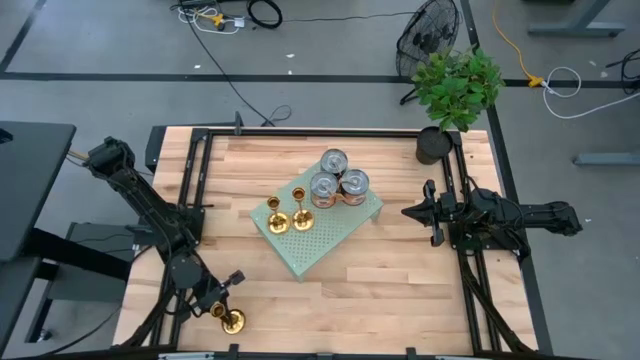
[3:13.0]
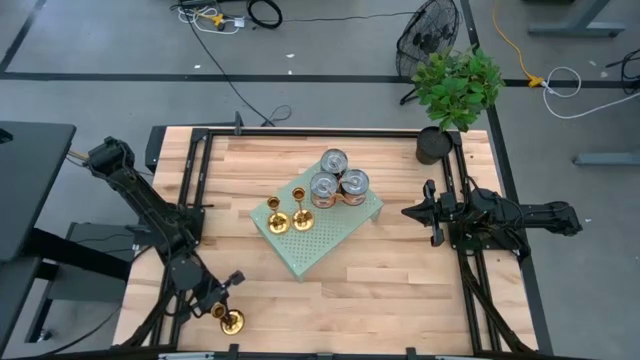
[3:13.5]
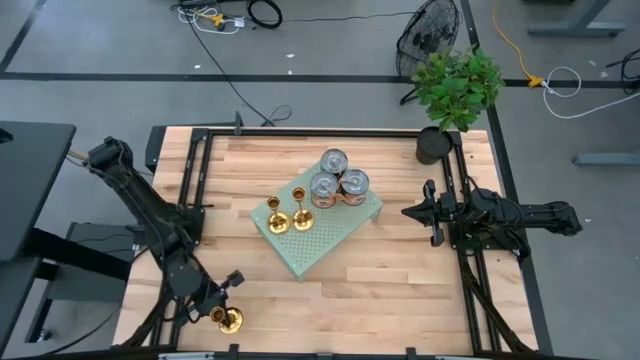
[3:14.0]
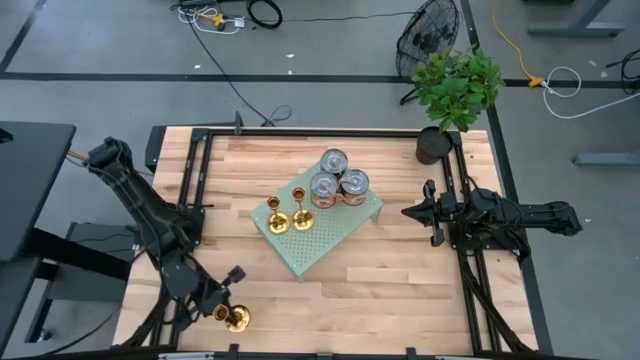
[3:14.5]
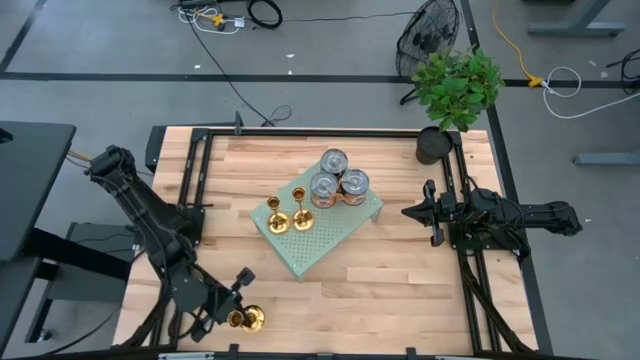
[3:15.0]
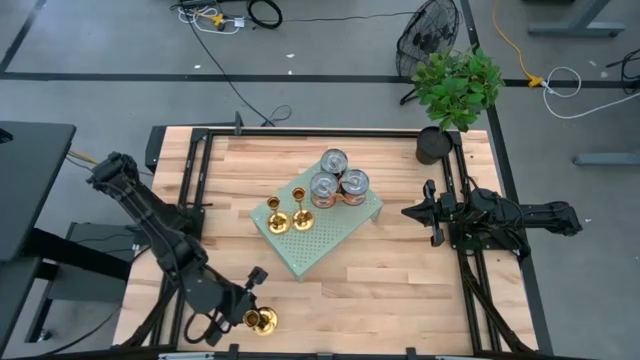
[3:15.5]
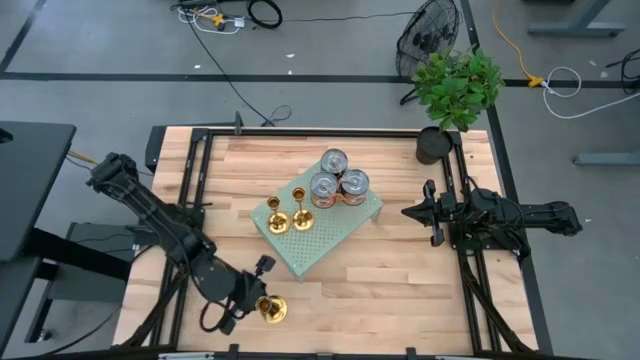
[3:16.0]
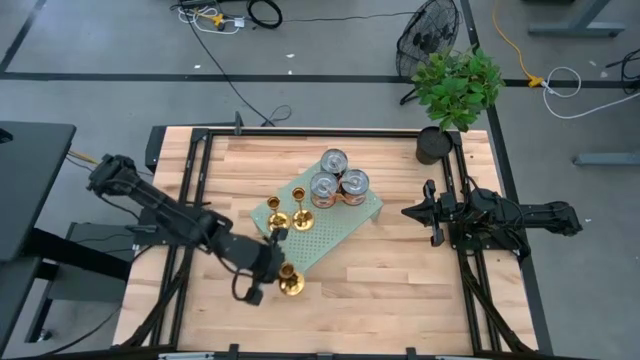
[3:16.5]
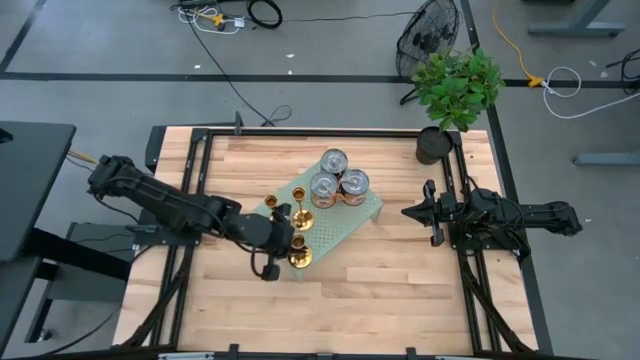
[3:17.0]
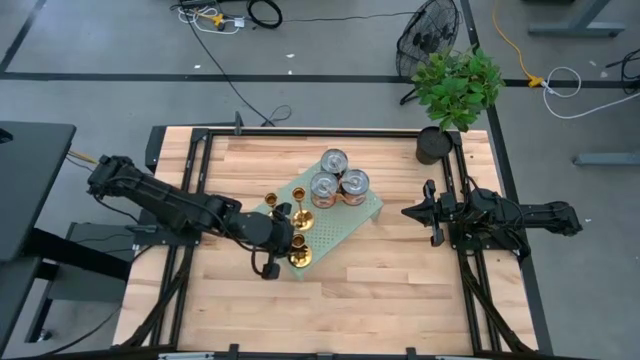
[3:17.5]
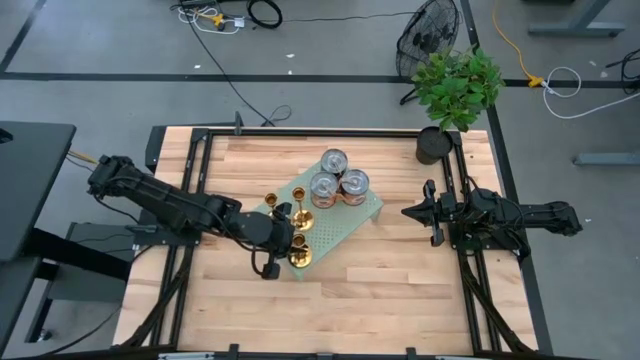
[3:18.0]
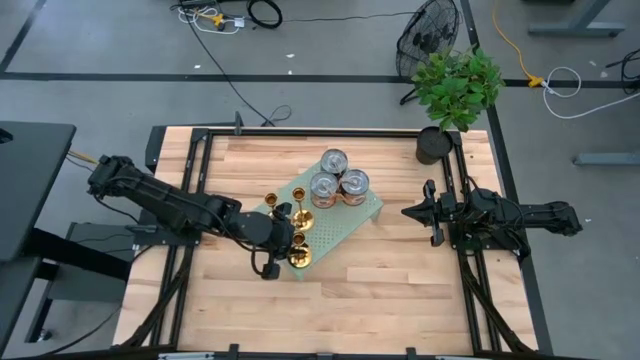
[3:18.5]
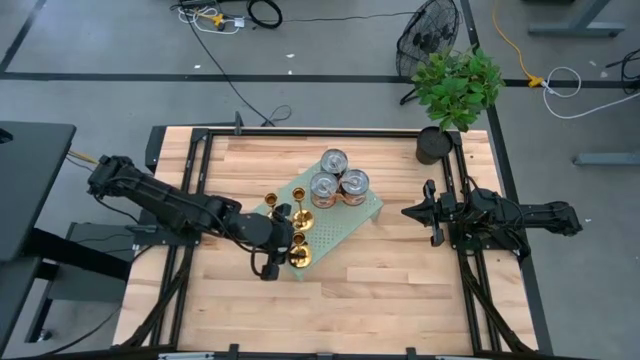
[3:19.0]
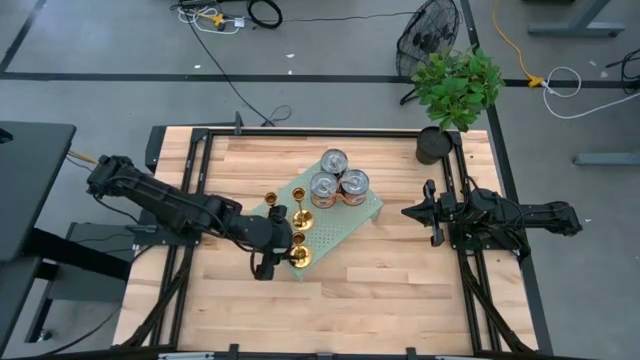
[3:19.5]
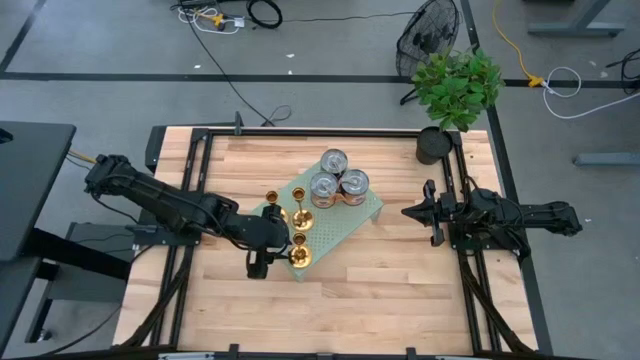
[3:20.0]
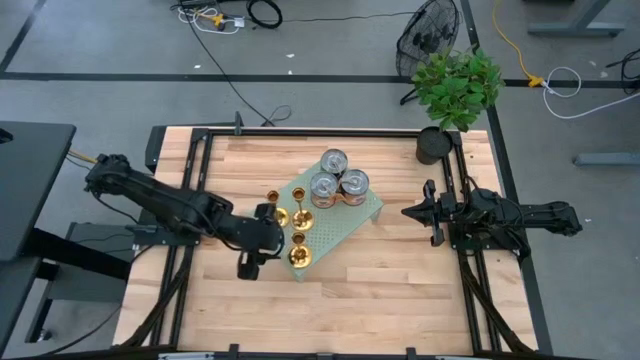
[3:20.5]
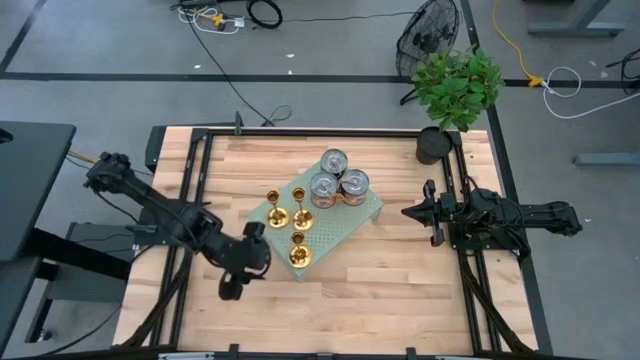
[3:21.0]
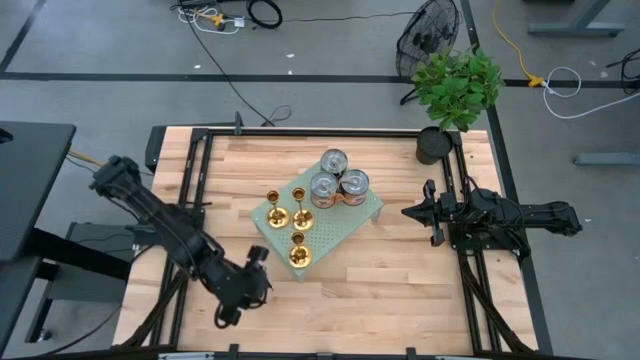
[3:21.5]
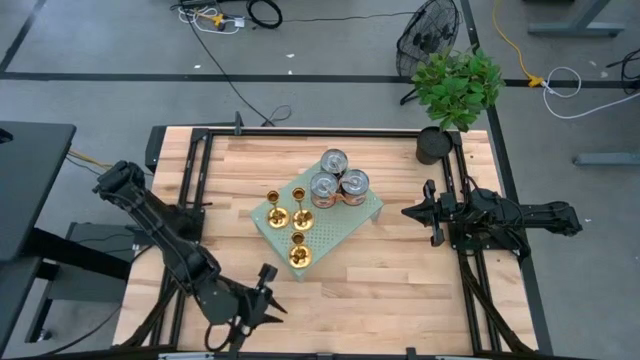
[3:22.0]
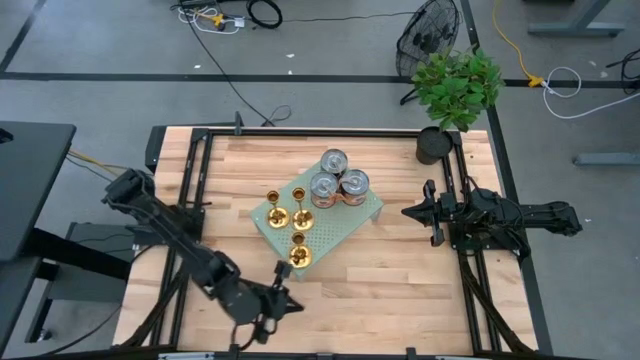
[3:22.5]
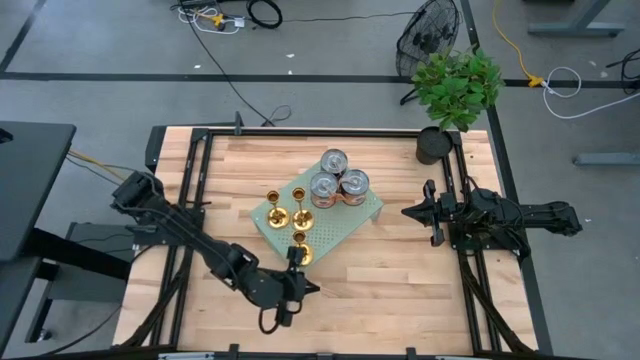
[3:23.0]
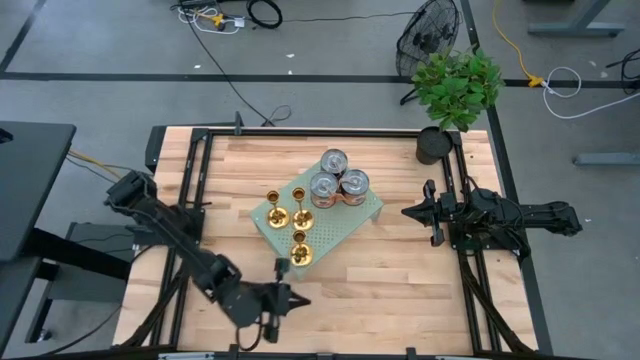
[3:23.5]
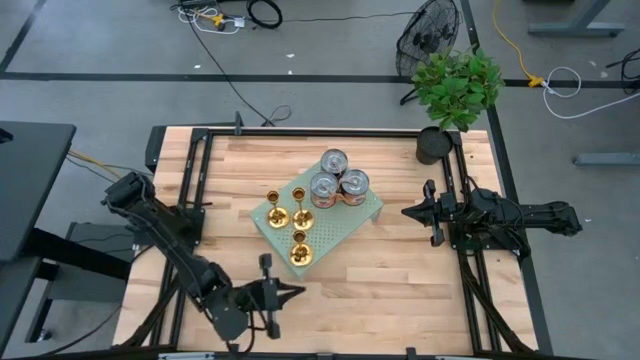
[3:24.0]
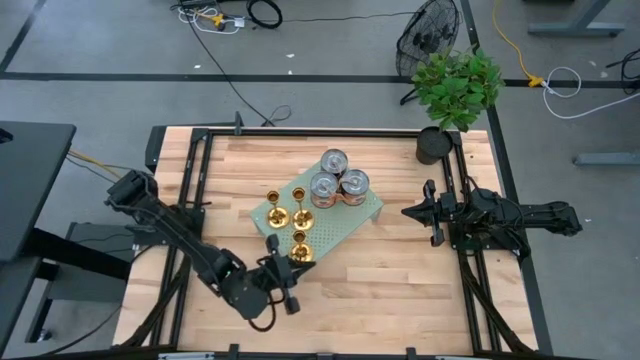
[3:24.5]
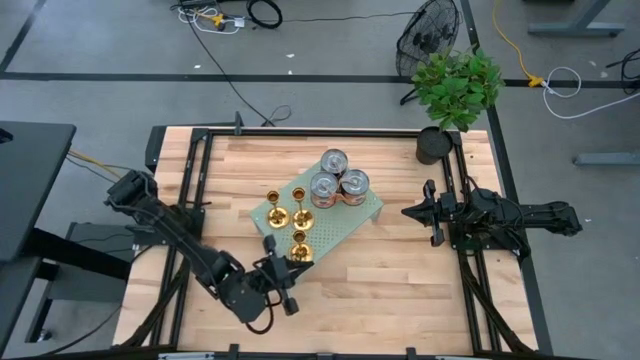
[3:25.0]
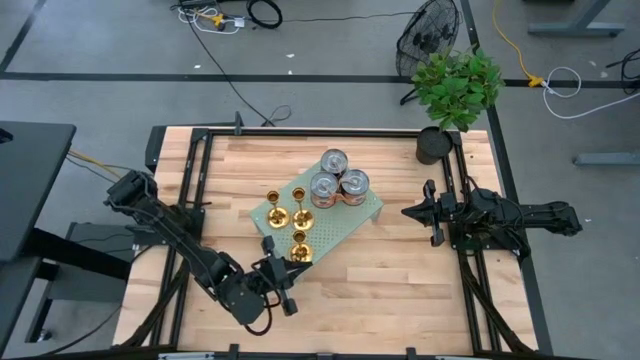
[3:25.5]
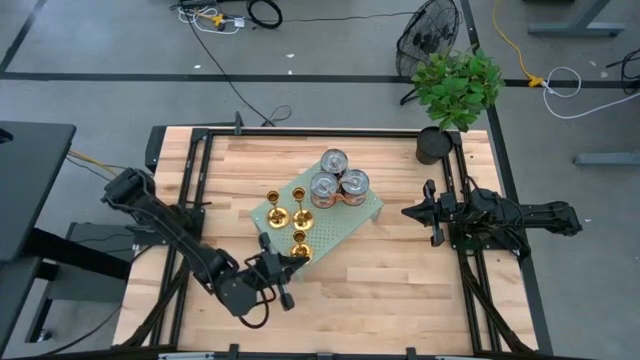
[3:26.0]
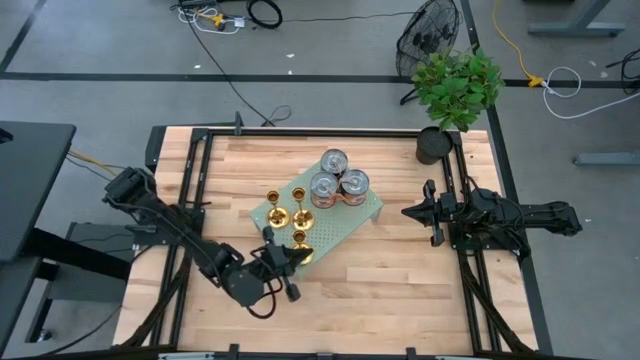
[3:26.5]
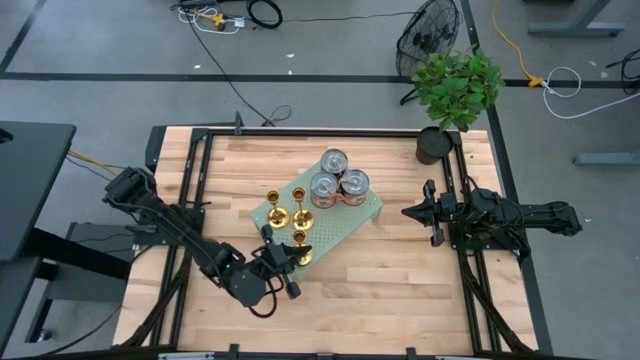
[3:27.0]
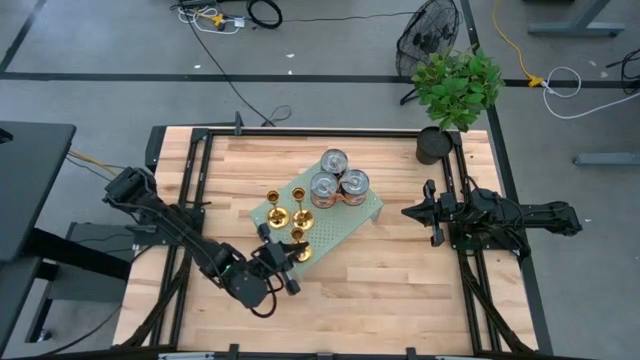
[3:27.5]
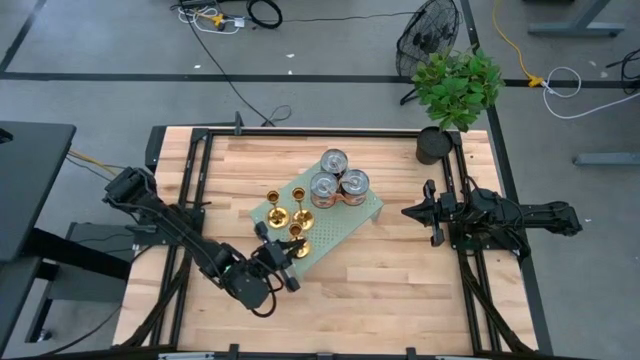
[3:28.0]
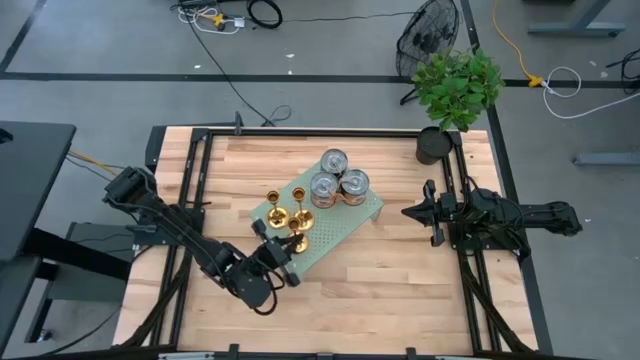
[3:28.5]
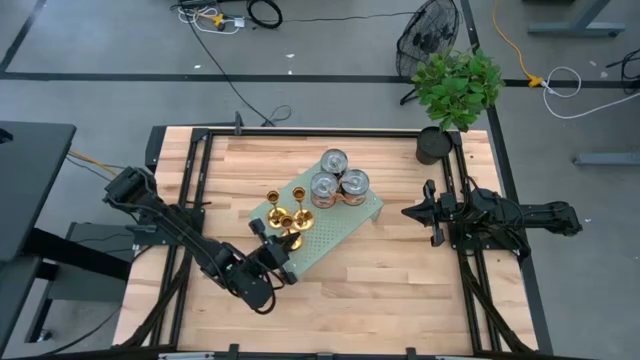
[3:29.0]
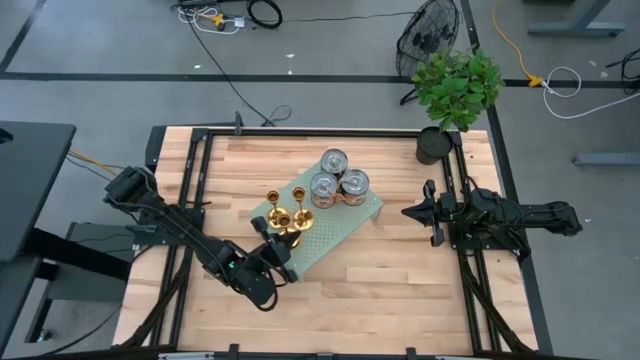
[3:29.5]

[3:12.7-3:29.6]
Task: Pick & Place candle stick holders
Put the gold candle holder on the shelf

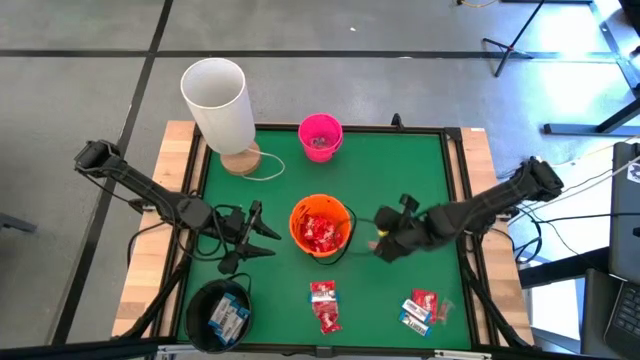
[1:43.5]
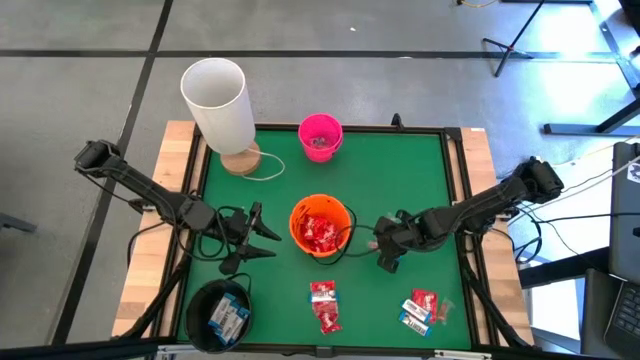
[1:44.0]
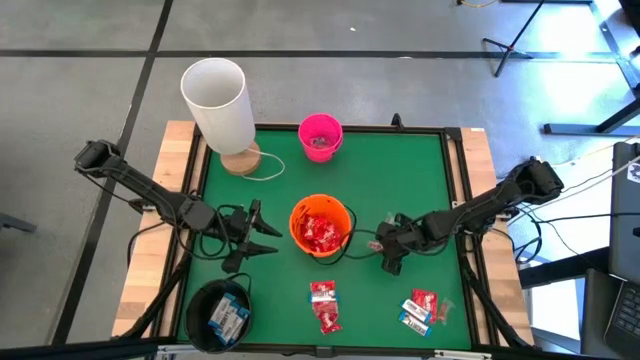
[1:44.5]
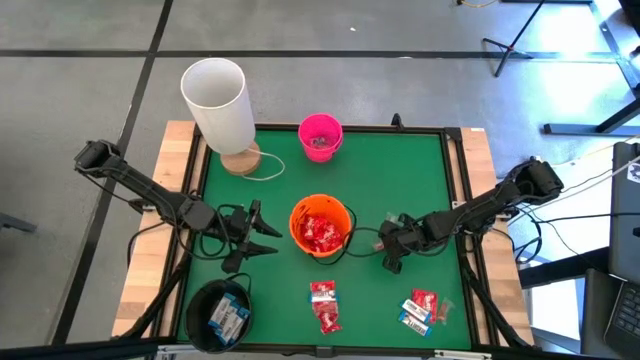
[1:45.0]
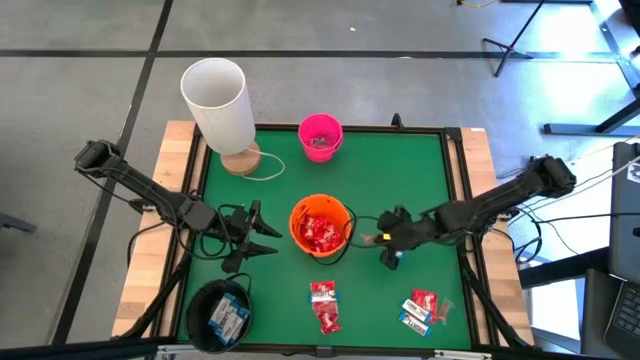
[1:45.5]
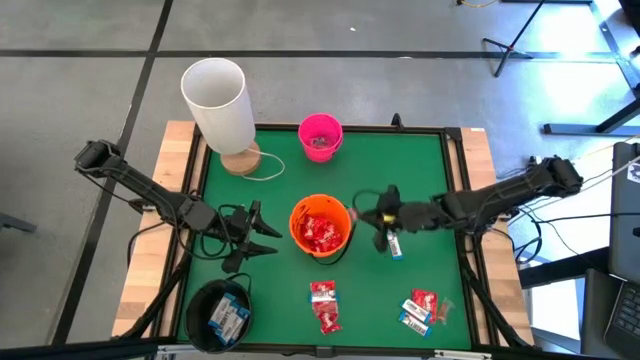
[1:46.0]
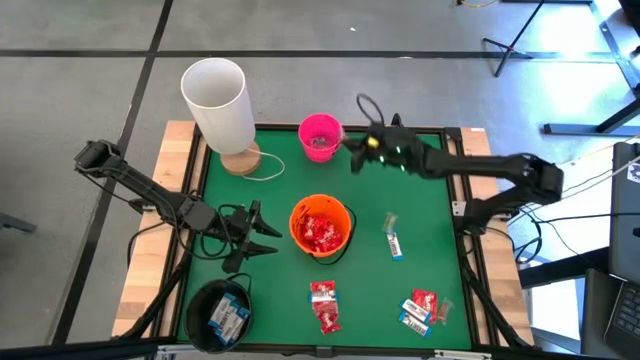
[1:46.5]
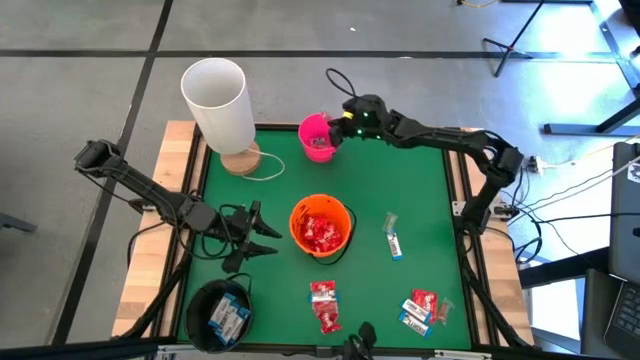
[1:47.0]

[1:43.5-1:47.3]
Task: Sort candy
Put the orange gummy into the pink bucket
